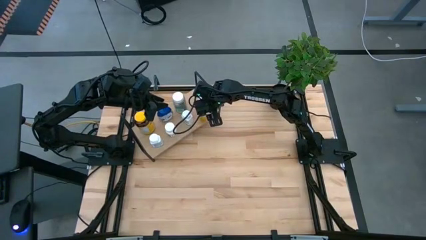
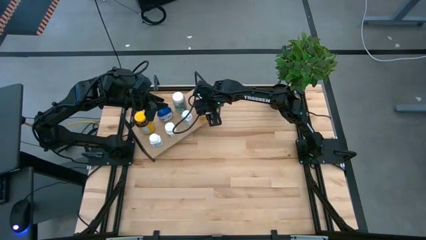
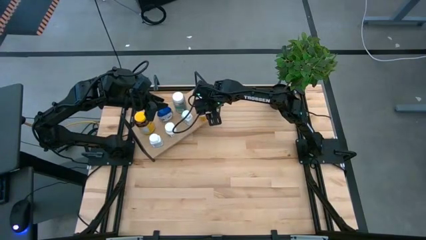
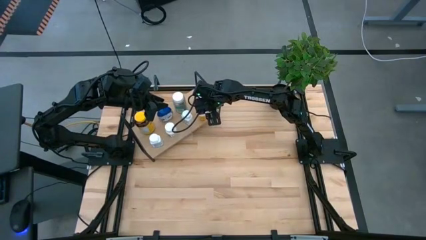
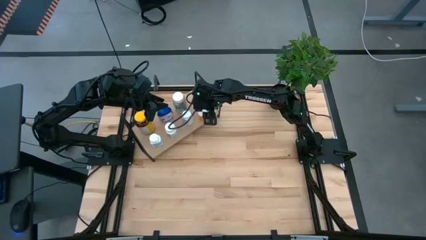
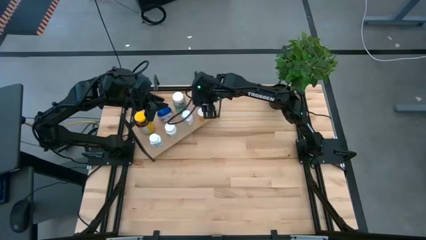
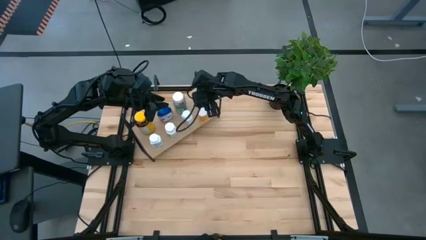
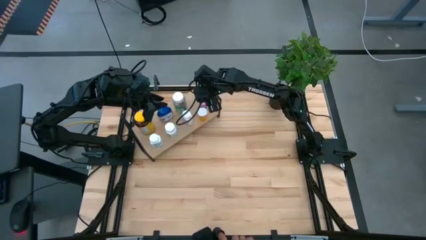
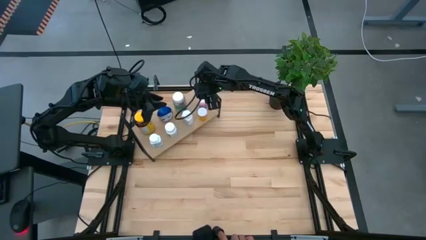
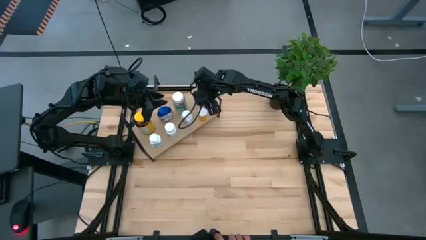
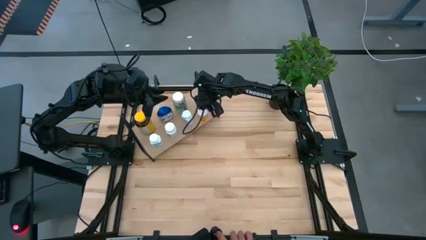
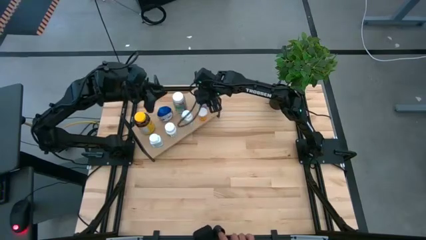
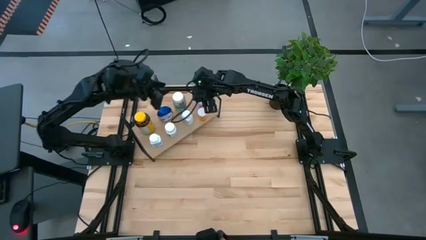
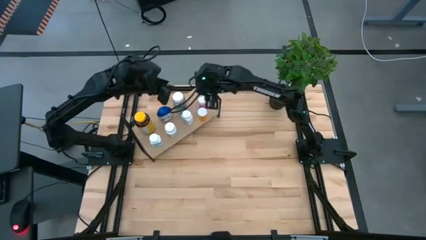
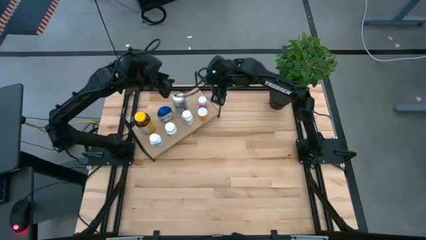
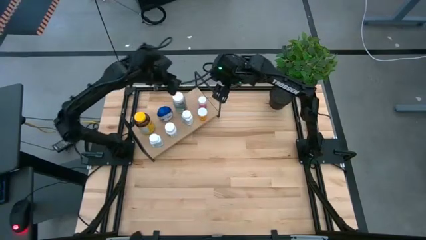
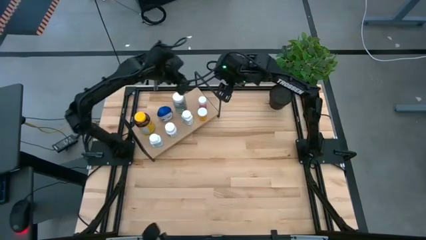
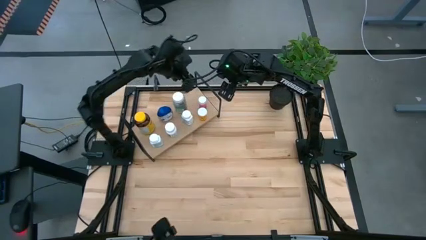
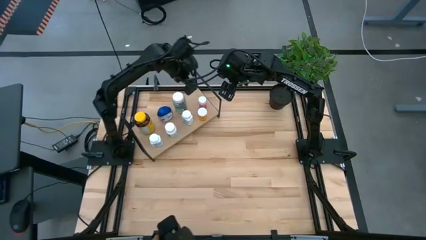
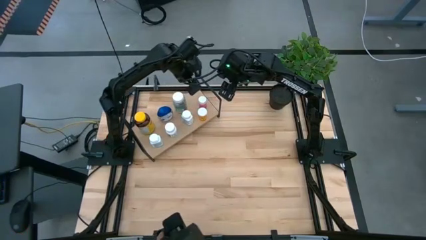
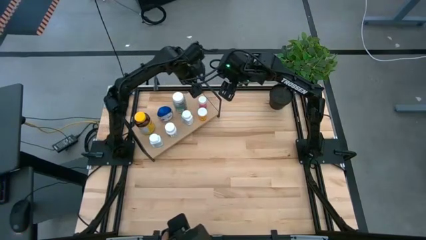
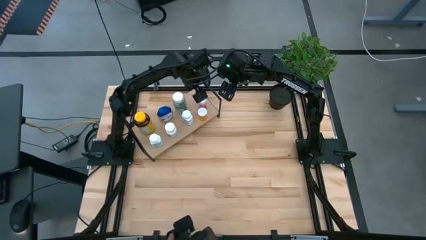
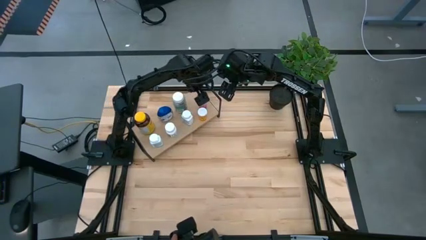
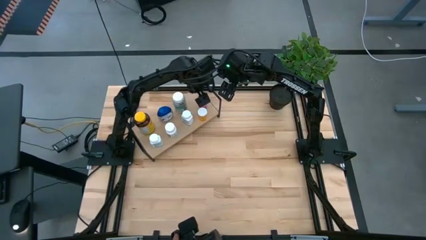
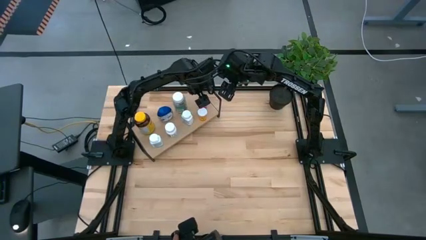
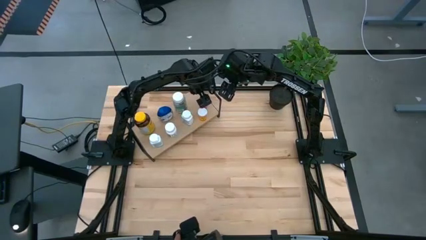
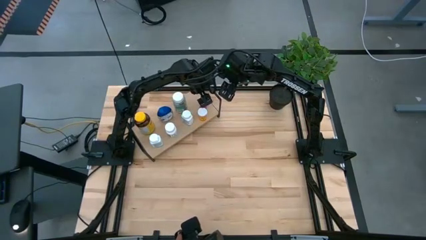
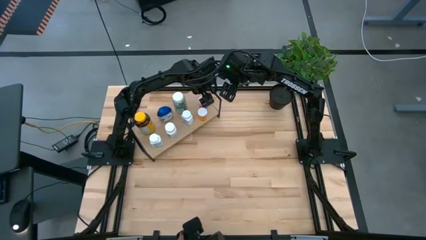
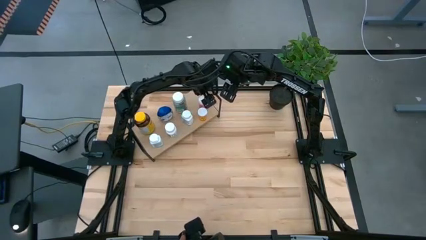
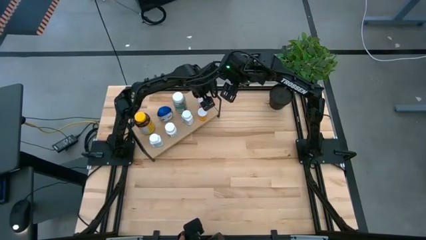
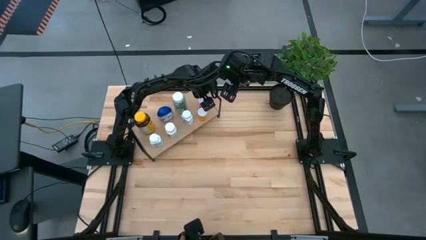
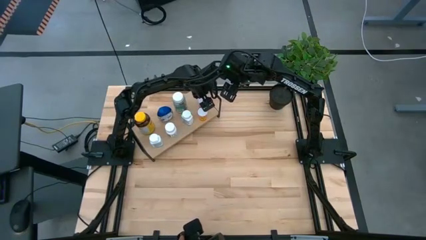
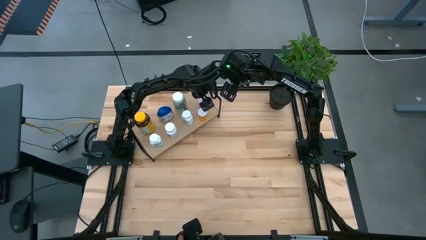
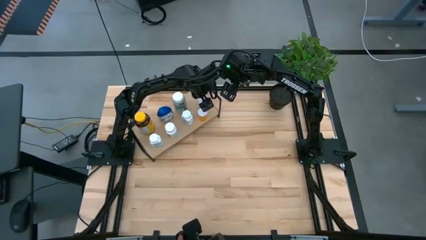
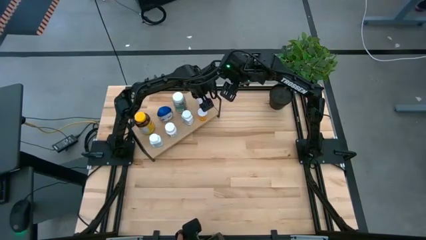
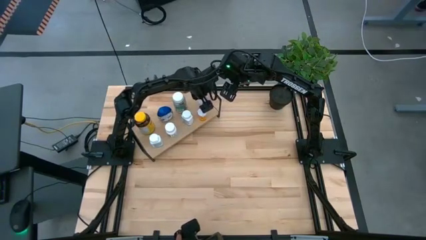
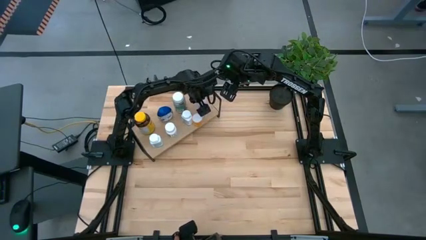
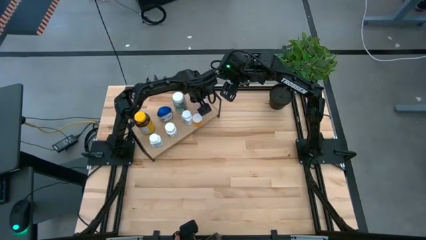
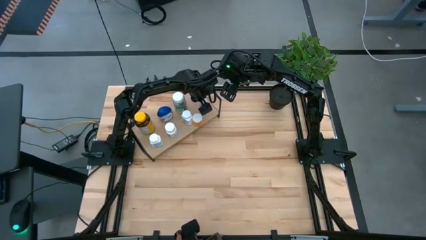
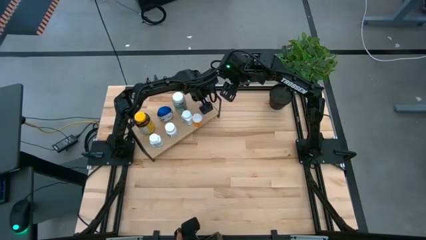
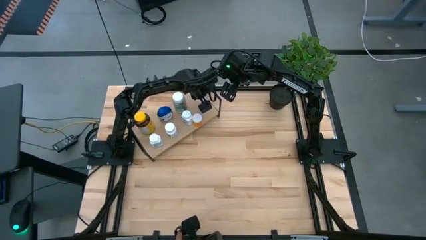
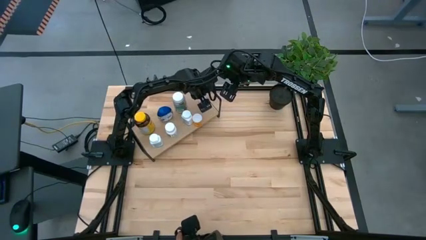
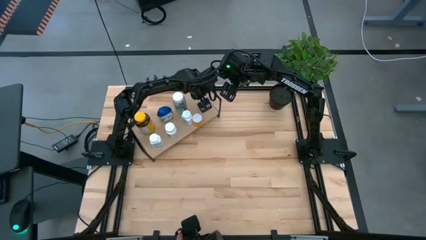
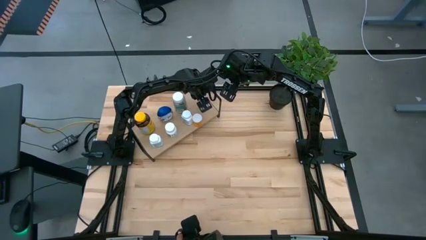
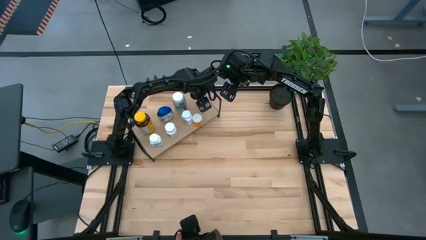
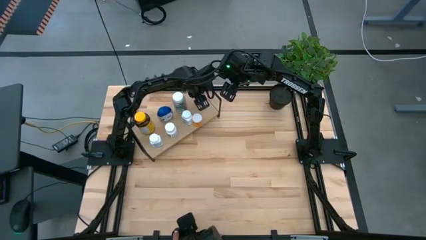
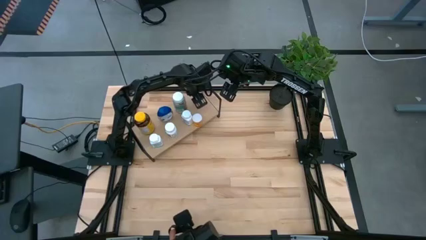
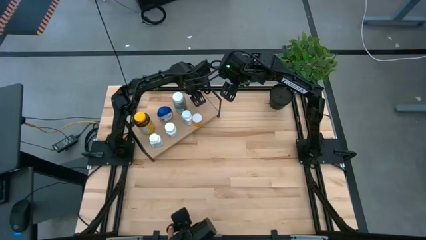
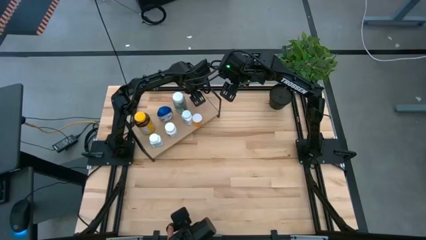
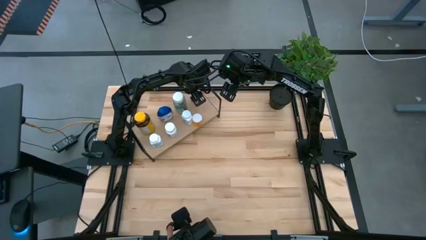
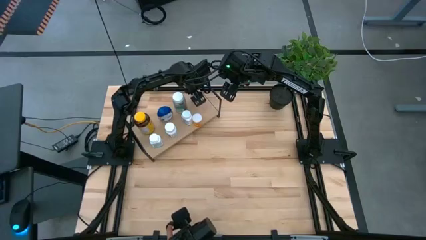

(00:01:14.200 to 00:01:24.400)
Task: Pick and place medicine bottles onto shelf by color
Adjust the pink medicine bottle on the shelf

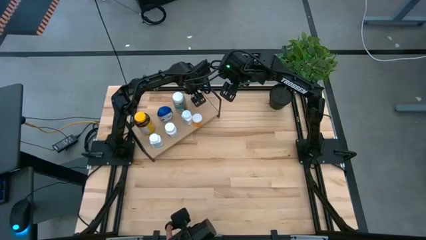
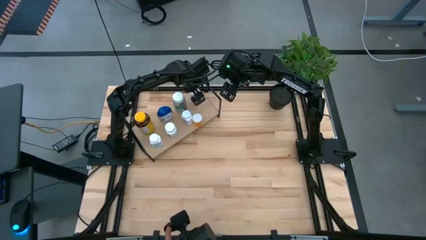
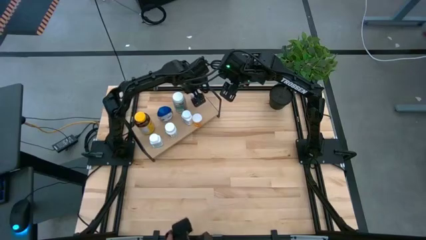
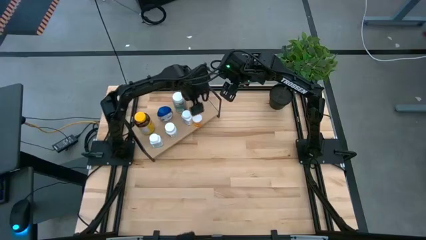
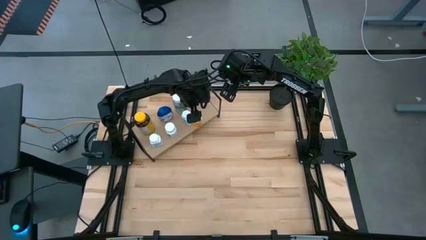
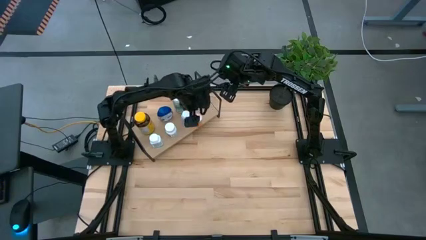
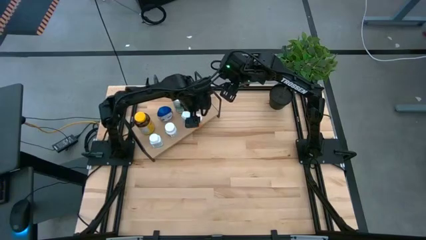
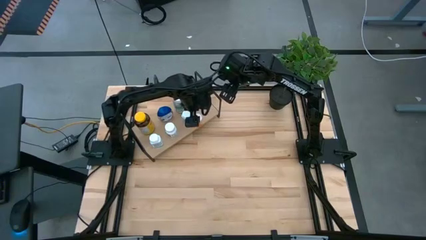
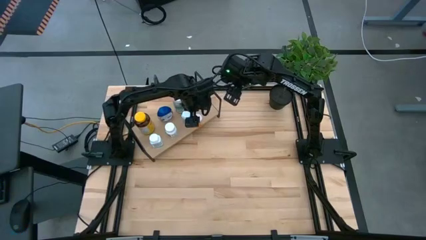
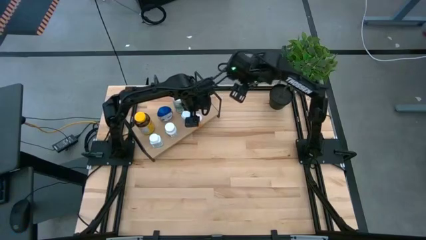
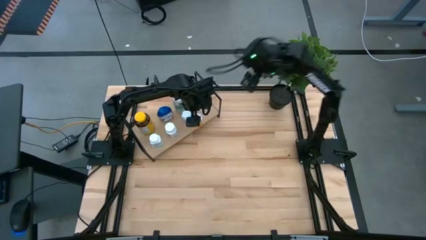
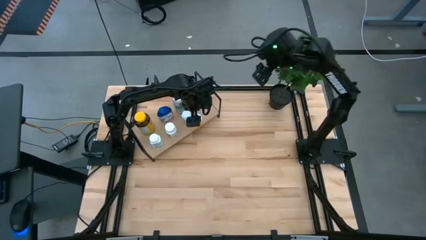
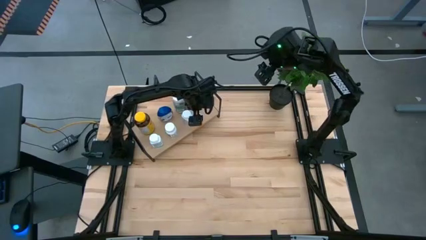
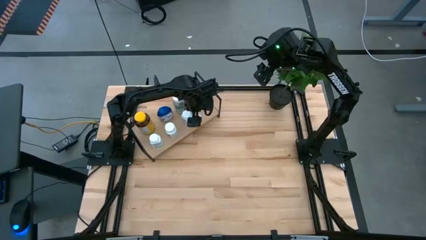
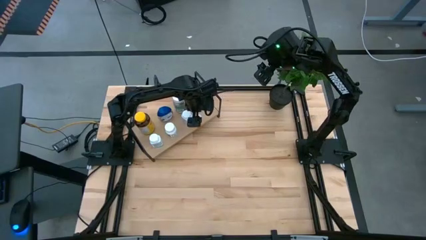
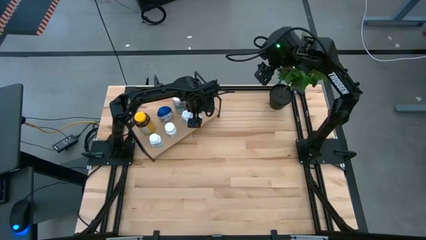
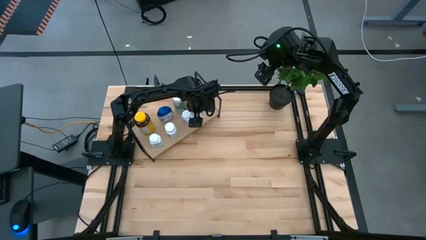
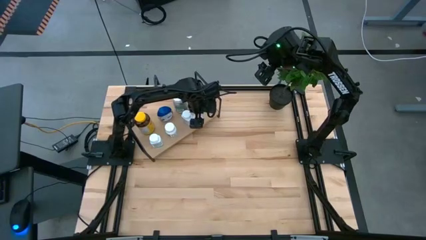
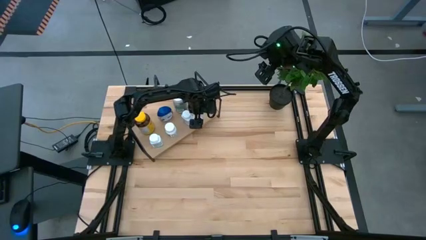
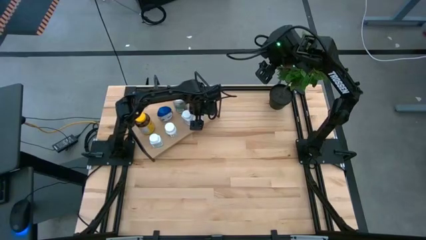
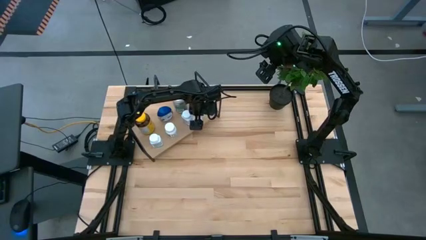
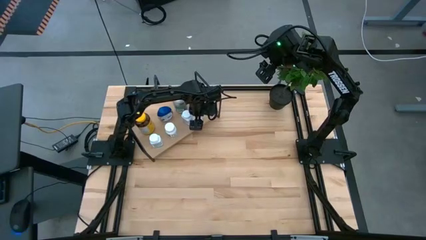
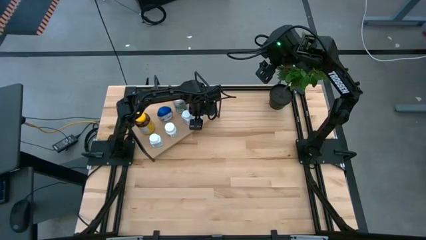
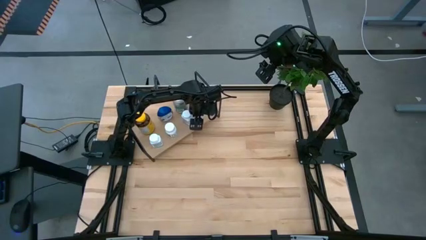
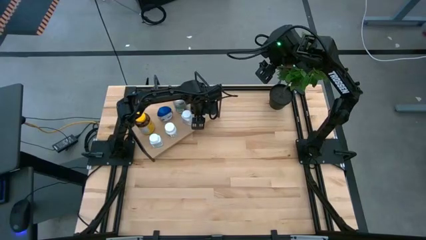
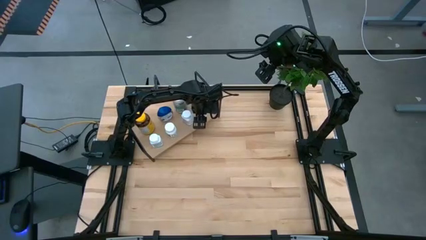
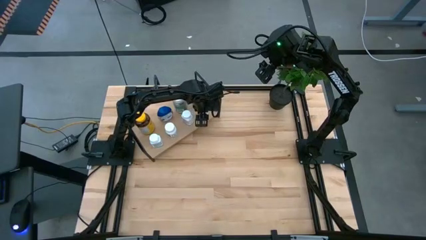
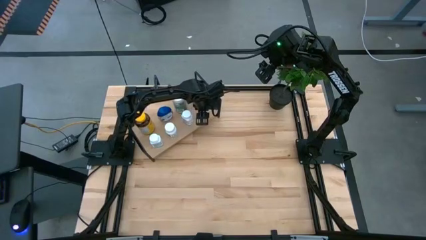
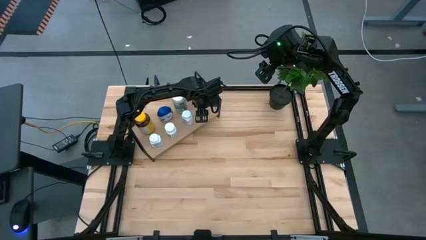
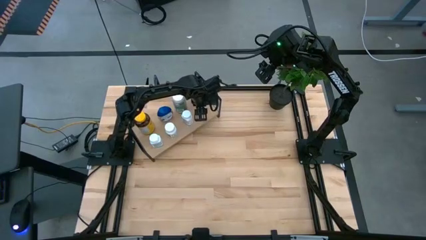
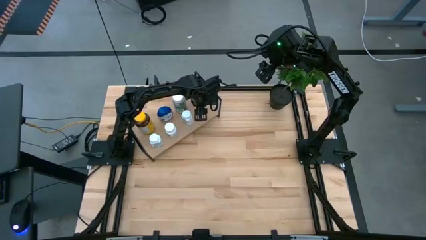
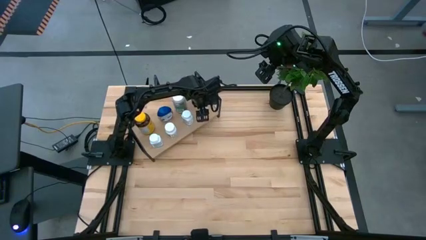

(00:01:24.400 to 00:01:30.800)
Adjust the orange pill bottle on the shelf
